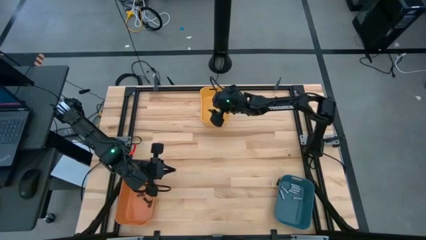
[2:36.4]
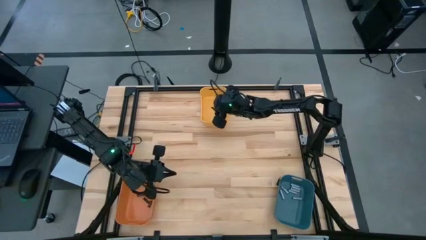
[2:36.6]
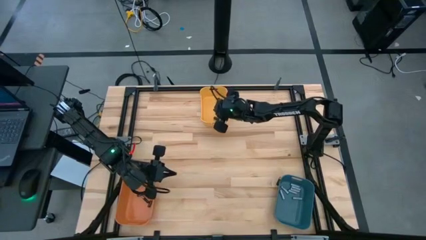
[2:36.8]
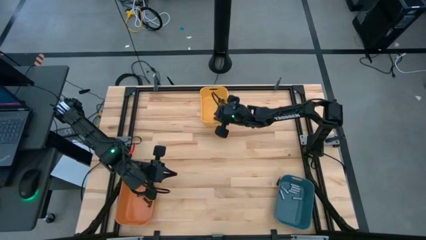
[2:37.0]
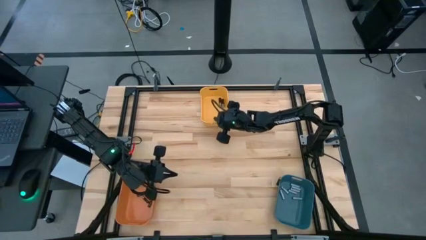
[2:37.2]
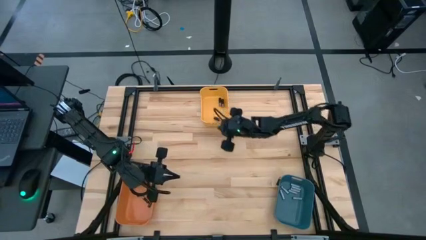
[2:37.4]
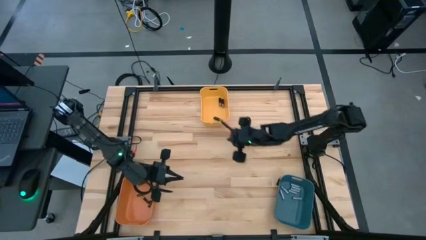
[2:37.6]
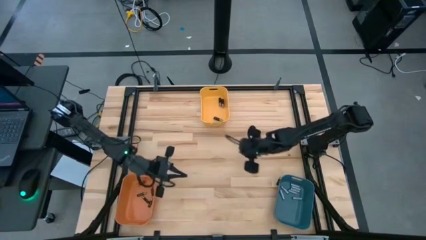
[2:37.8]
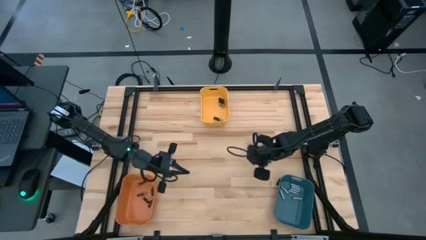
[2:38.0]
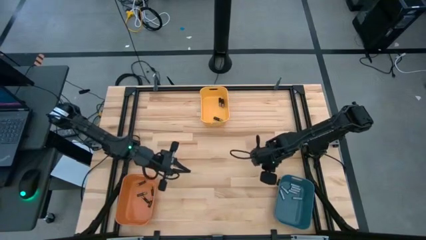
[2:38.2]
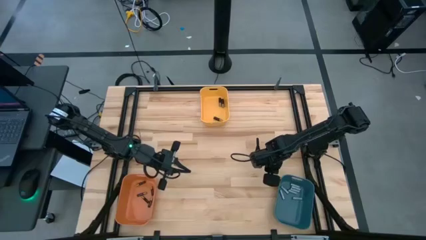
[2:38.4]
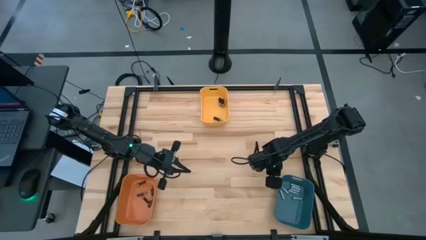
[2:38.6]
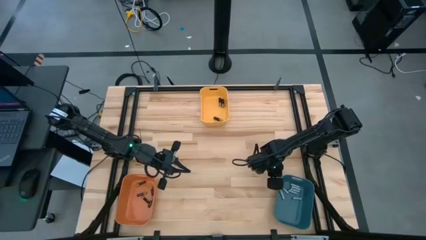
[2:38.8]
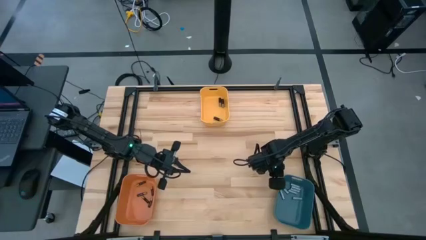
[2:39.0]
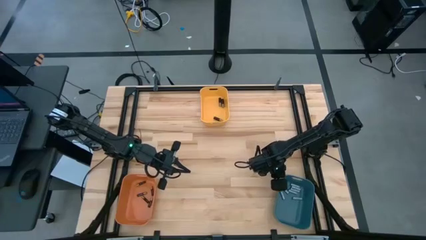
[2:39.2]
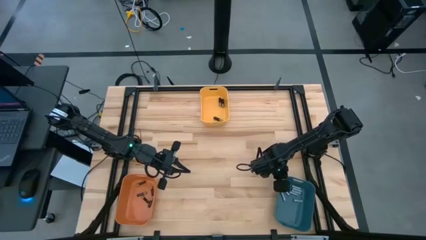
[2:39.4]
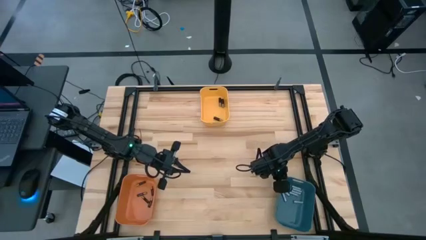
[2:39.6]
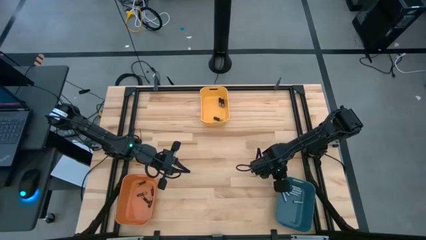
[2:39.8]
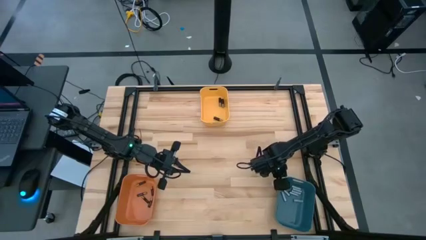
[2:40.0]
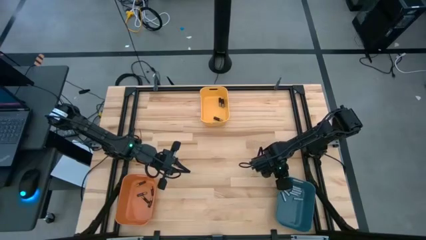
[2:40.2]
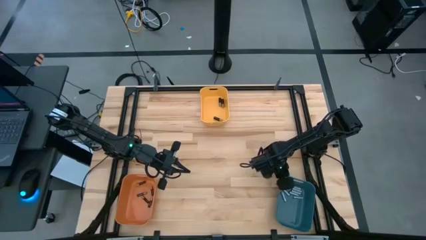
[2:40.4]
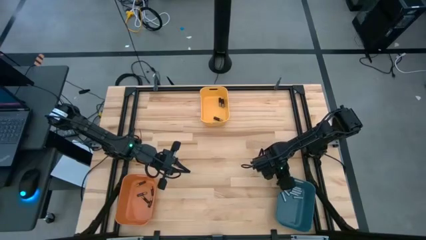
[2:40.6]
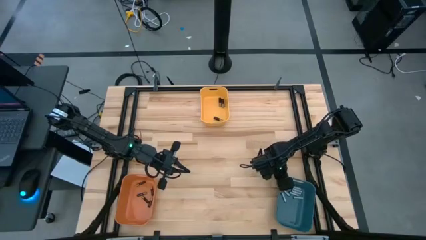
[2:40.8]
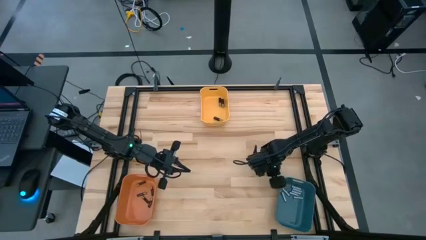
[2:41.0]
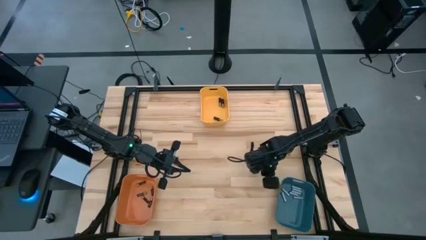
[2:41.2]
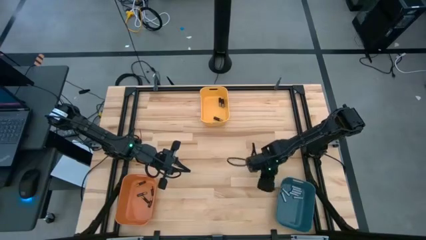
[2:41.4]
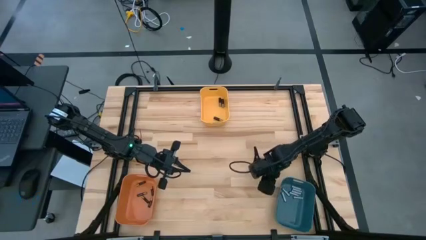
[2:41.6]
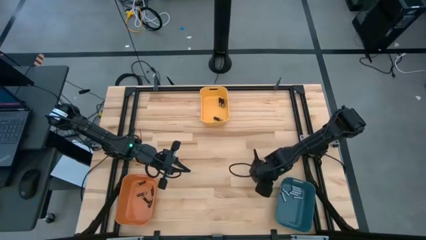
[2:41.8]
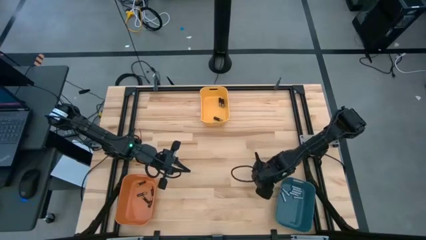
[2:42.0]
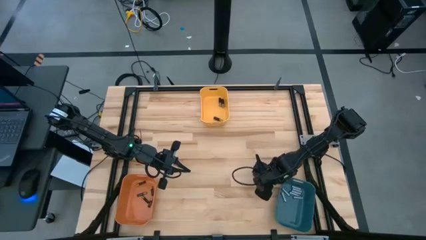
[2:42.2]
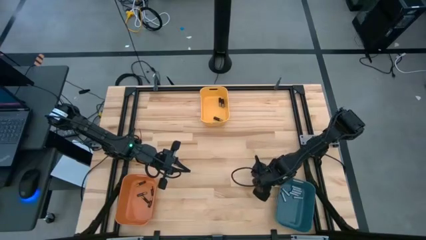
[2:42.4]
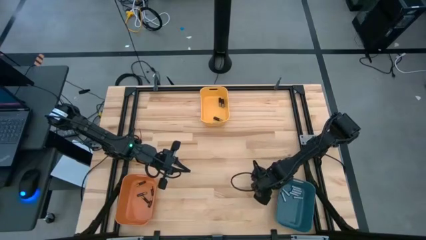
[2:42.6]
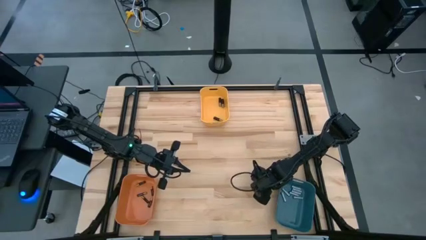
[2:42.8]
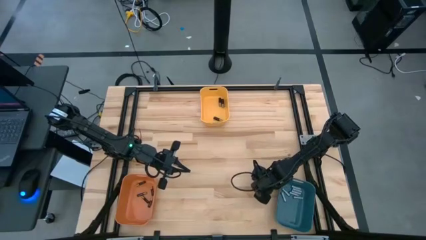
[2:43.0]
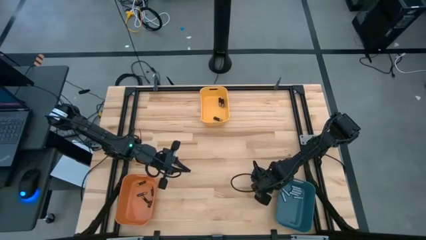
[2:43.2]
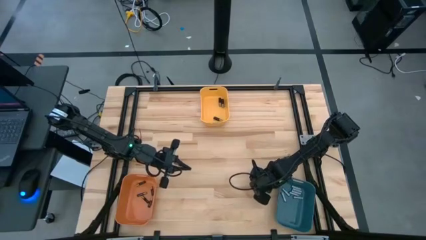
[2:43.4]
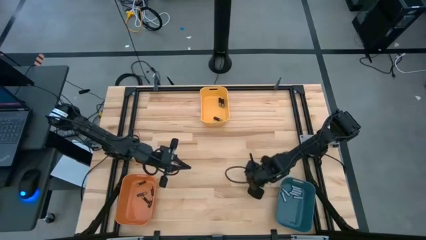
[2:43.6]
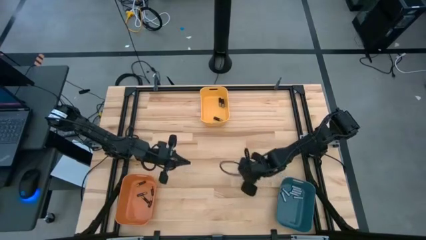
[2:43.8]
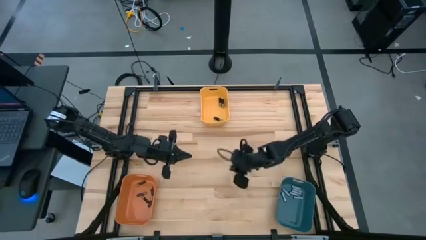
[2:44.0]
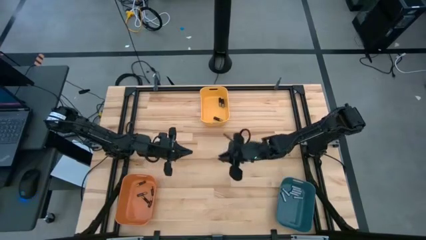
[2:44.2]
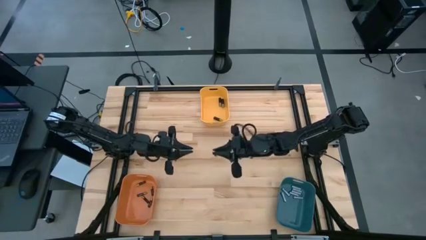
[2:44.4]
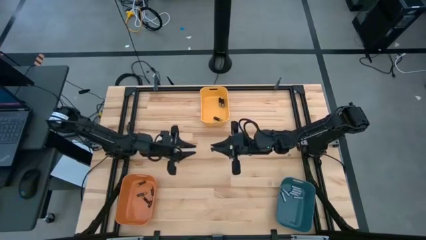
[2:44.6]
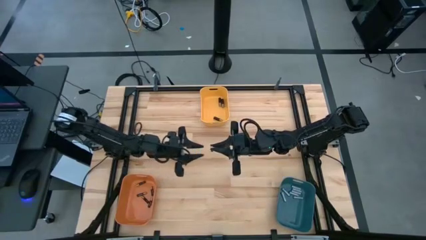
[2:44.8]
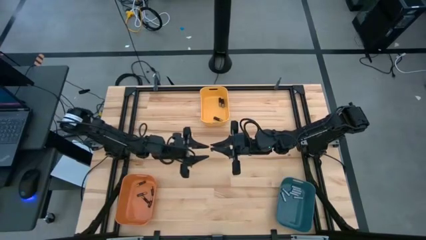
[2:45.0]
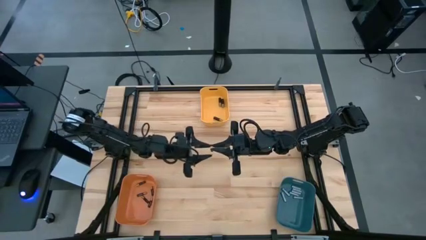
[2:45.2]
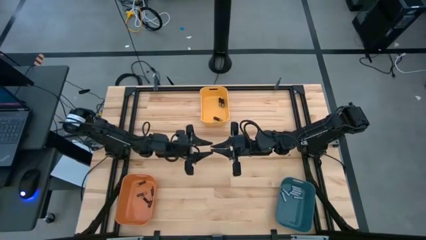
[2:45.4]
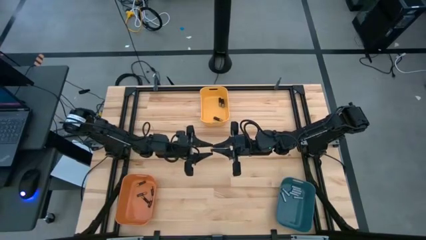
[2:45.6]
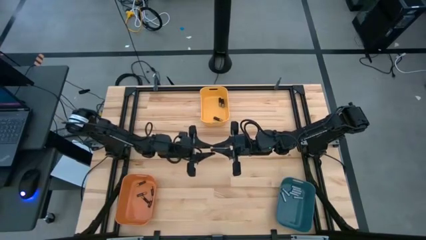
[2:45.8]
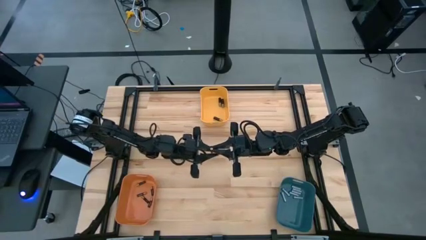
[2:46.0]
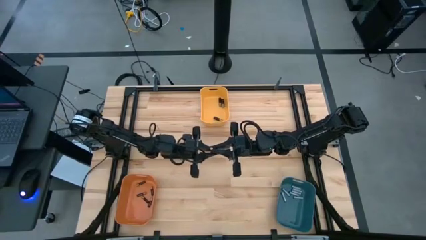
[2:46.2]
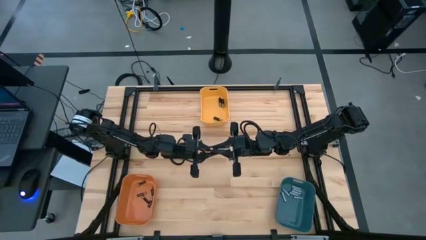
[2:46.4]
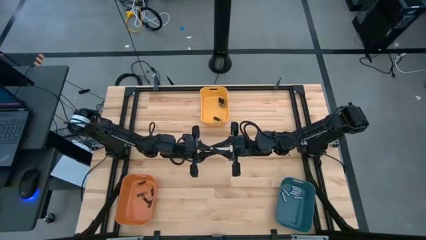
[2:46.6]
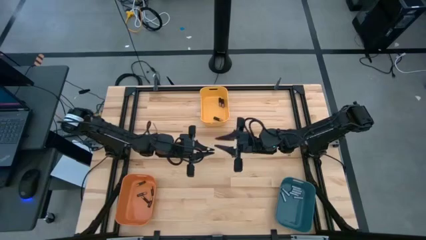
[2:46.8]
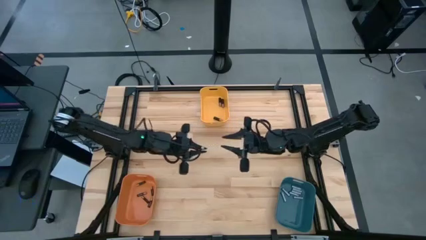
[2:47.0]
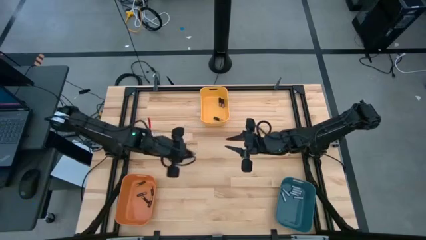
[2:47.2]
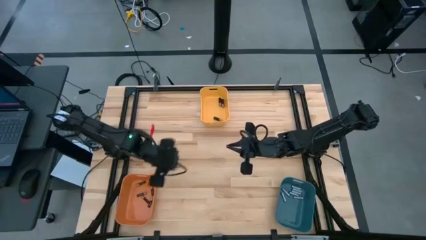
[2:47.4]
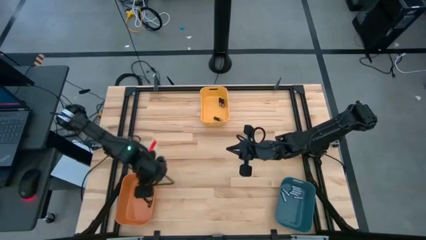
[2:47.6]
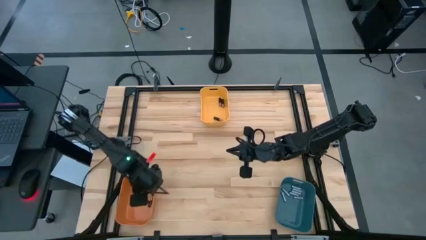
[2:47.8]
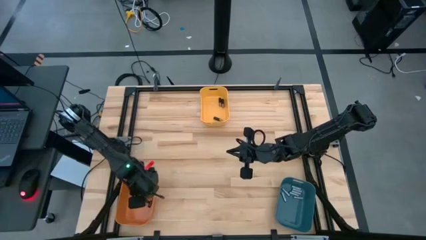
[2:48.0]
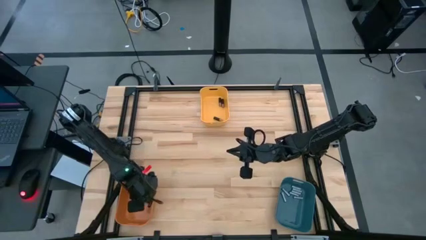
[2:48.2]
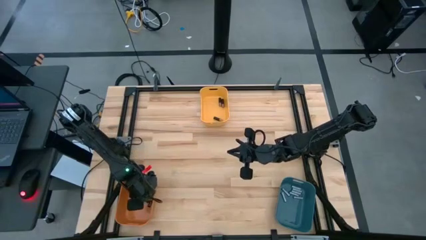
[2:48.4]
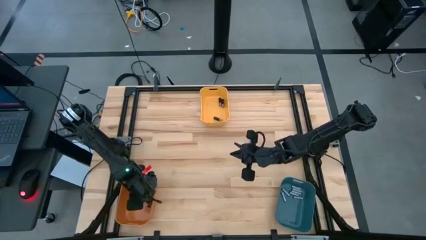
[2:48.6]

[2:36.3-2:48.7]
Task: Sort batteries
Put the small black battery into the orange bin

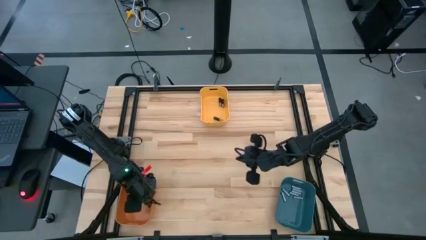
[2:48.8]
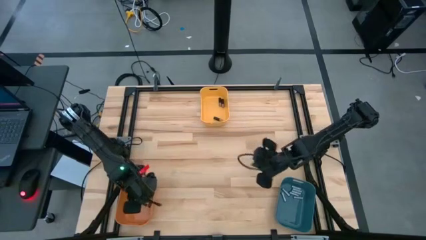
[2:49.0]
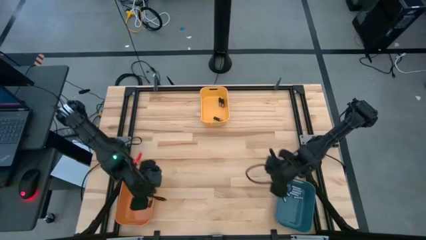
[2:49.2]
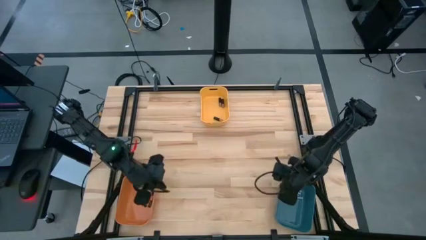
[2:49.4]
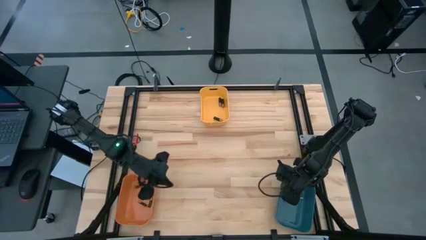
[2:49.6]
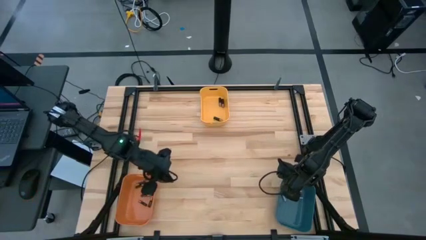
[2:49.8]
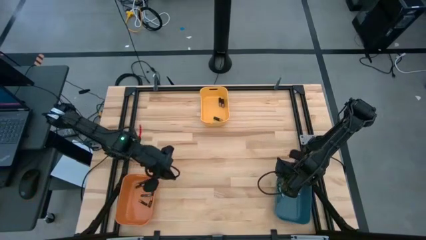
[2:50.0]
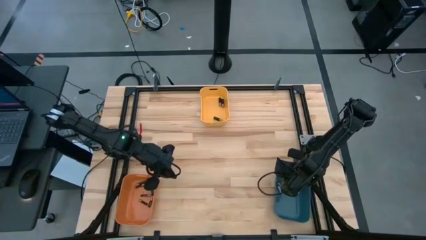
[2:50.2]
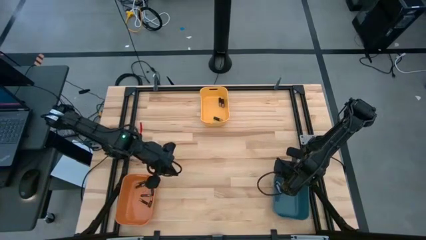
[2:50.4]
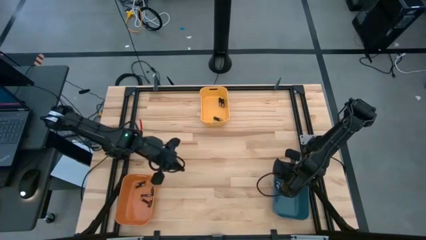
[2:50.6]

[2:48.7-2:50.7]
Adjust the the blue bin

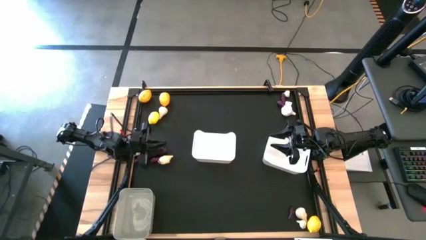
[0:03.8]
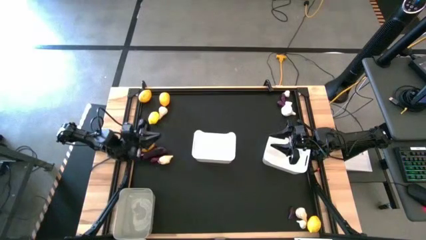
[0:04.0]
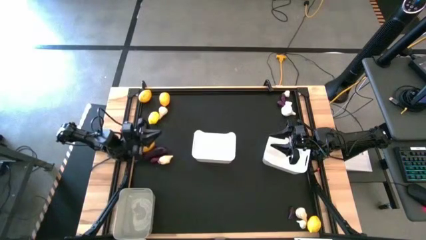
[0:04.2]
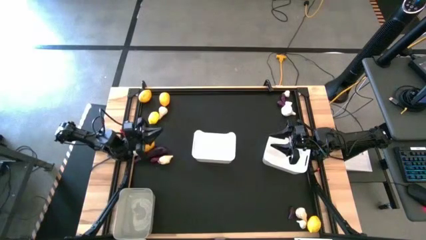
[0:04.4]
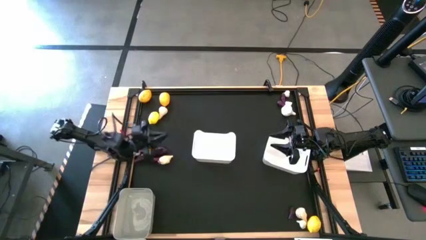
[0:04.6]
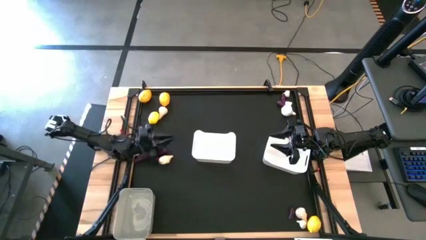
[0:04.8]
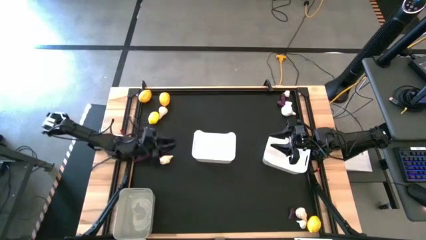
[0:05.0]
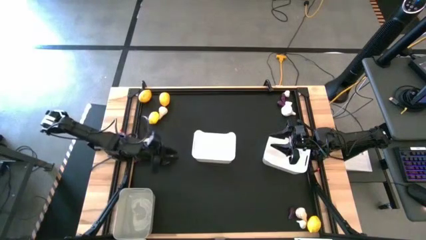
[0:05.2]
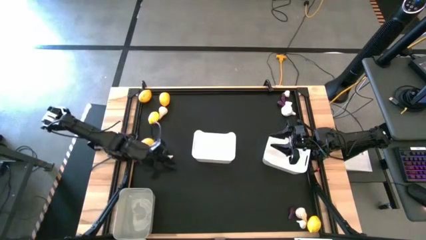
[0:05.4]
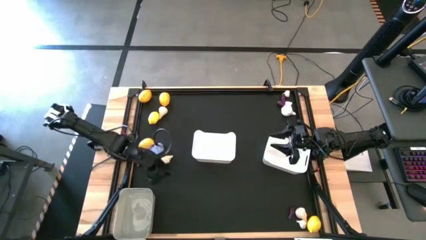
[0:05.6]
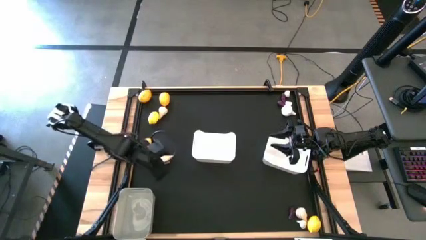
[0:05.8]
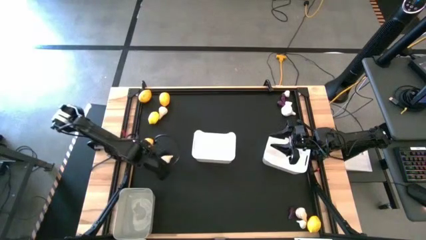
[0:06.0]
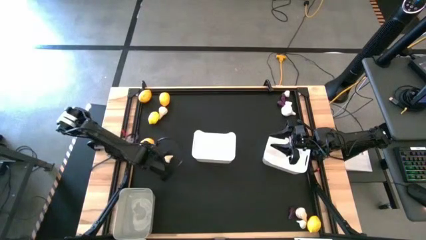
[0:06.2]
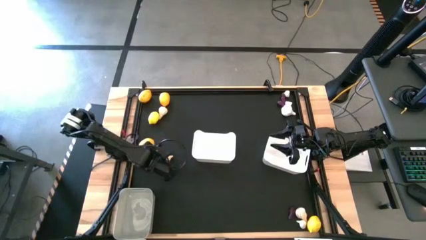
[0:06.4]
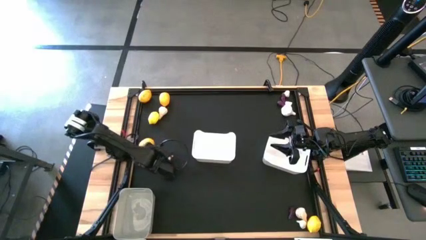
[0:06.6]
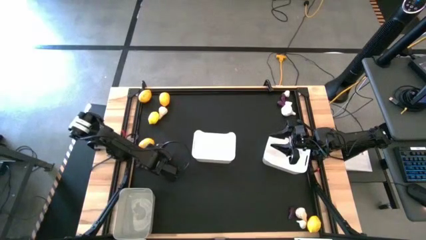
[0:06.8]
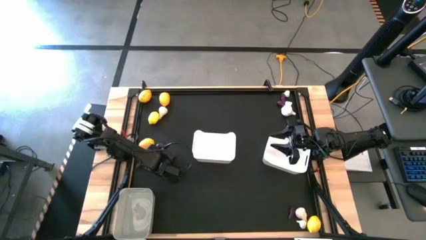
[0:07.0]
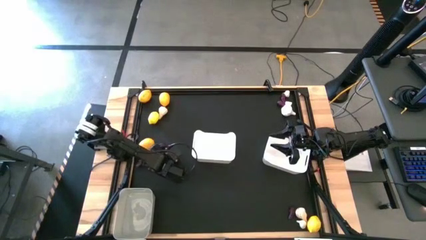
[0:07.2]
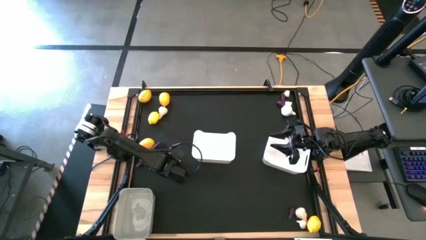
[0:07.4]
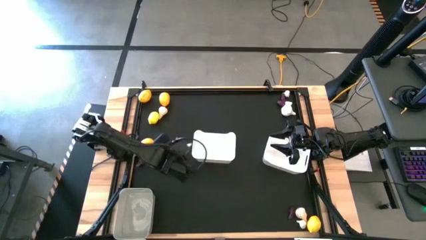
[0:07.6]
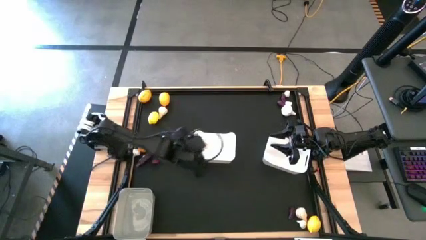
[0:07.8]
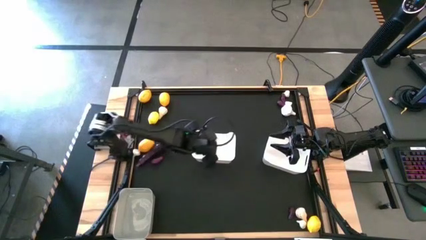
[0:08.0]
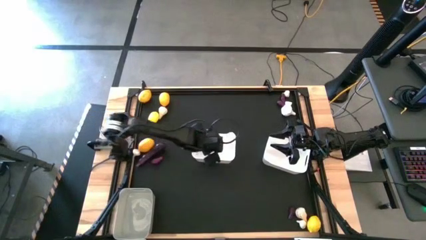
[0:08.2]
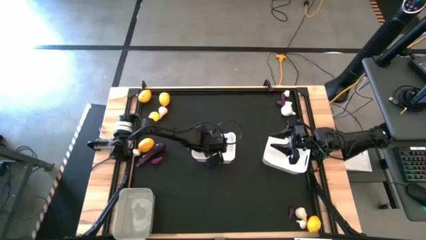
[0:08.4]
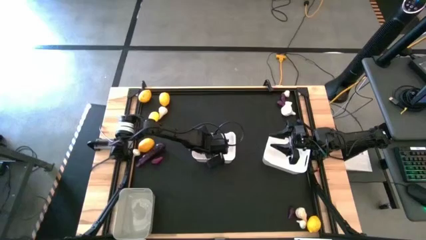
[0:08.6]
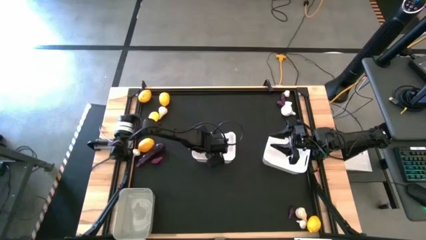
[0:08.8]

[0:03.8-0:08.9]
Task: Sort produce into baskets
Put the garlic into the left white bin
